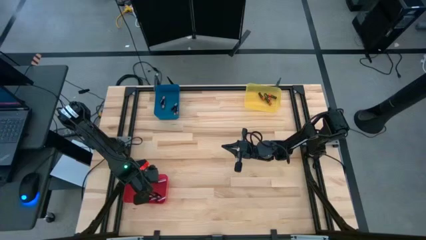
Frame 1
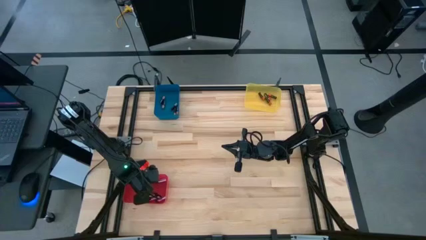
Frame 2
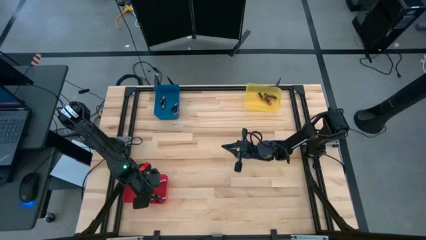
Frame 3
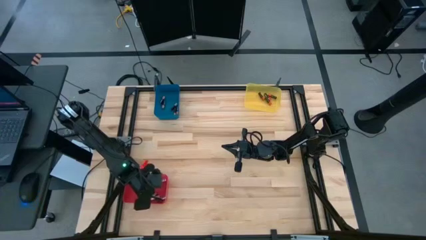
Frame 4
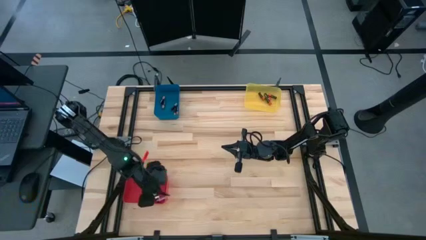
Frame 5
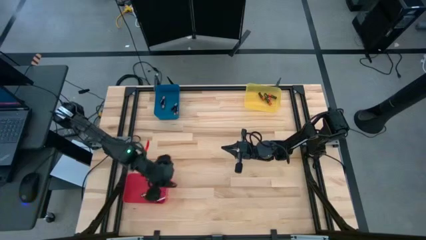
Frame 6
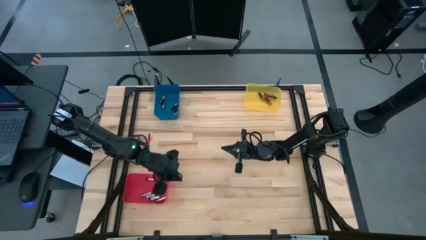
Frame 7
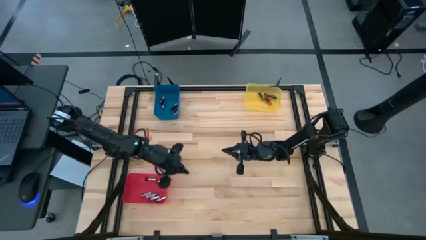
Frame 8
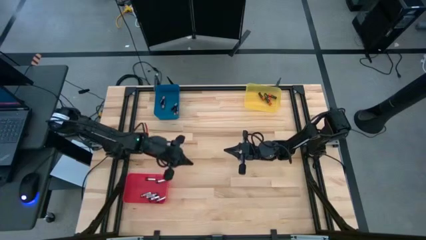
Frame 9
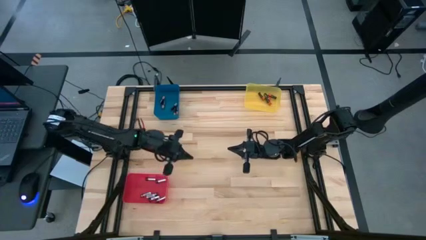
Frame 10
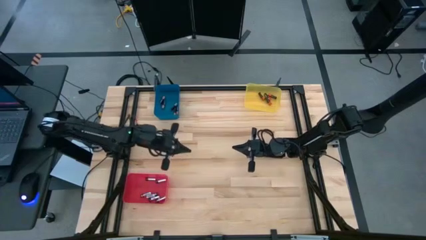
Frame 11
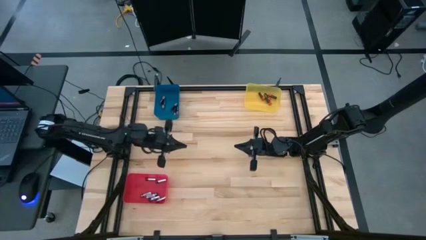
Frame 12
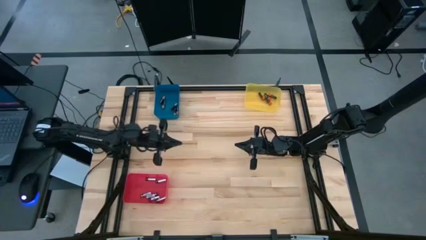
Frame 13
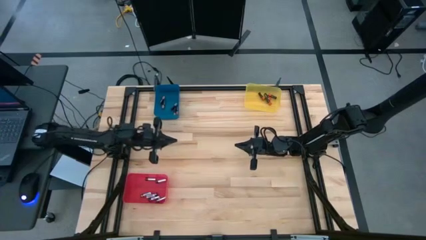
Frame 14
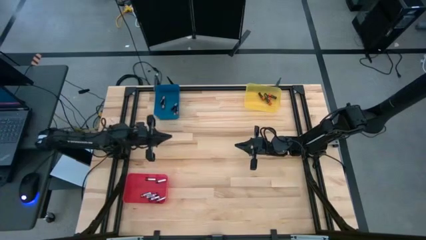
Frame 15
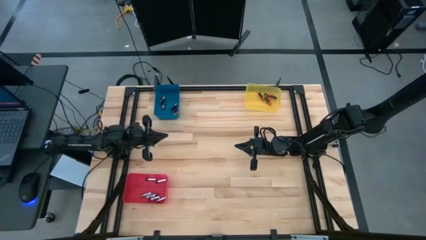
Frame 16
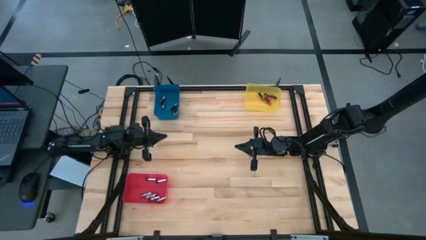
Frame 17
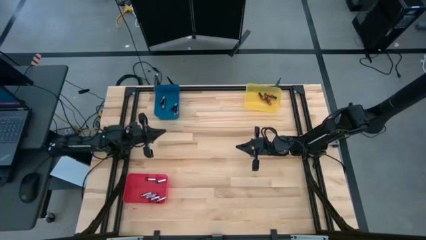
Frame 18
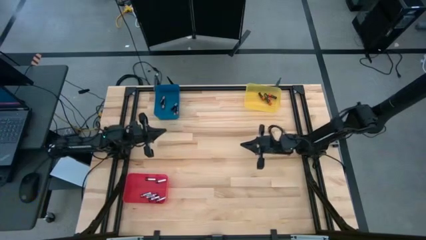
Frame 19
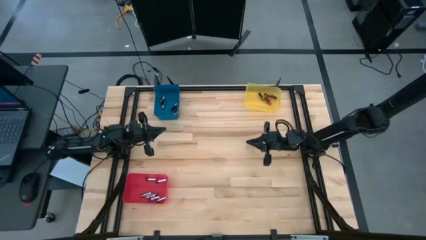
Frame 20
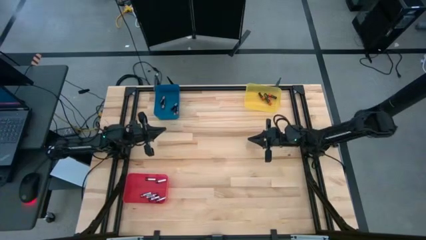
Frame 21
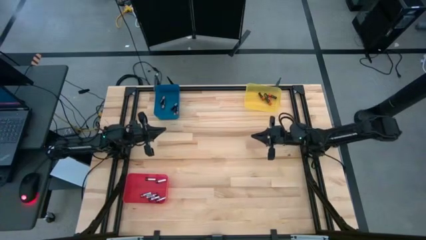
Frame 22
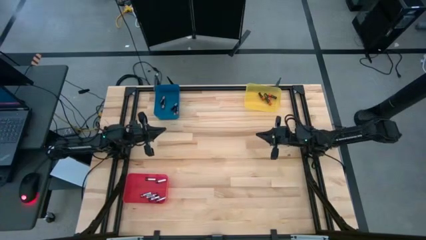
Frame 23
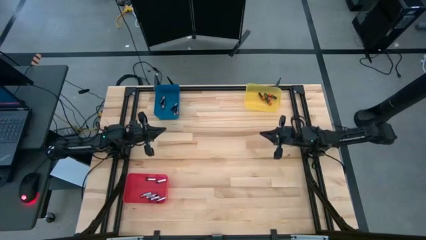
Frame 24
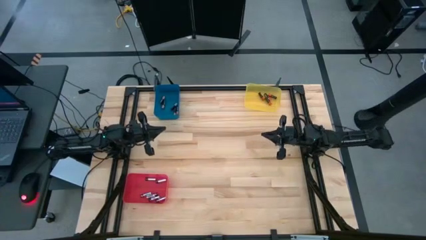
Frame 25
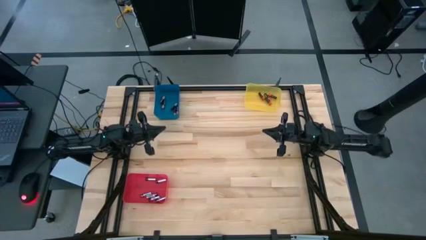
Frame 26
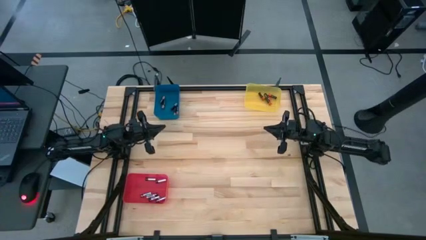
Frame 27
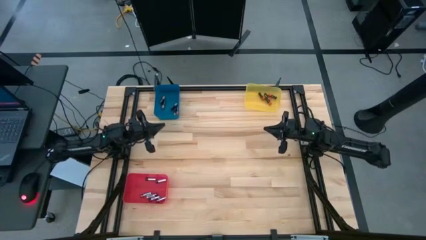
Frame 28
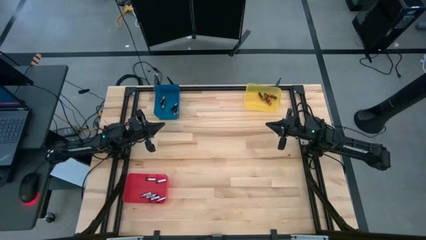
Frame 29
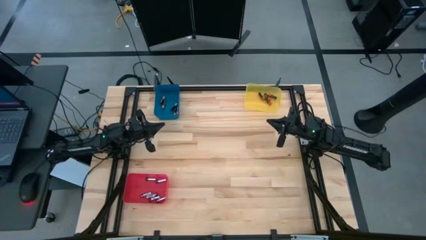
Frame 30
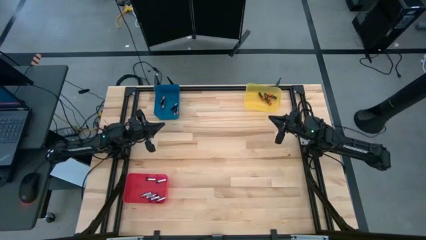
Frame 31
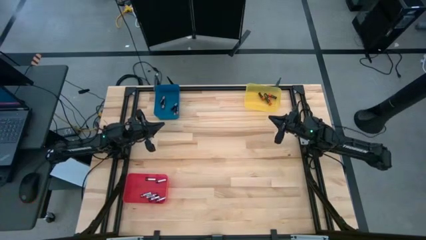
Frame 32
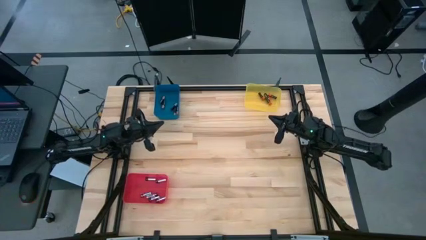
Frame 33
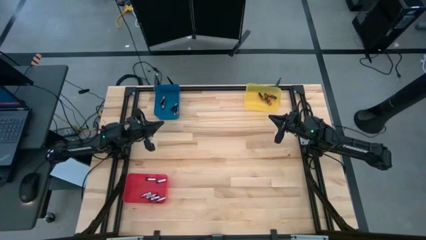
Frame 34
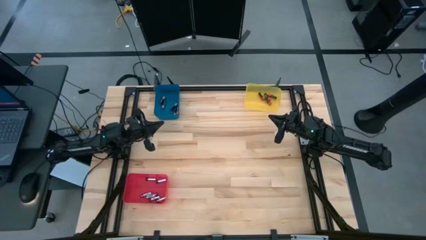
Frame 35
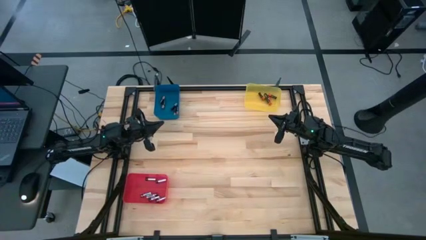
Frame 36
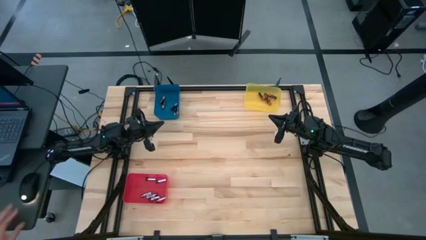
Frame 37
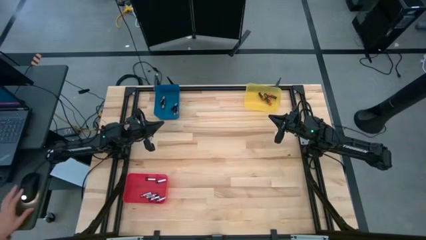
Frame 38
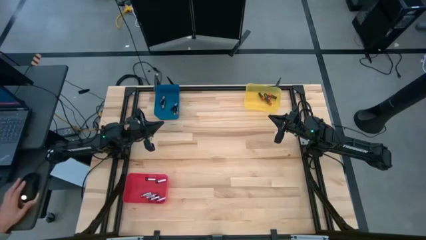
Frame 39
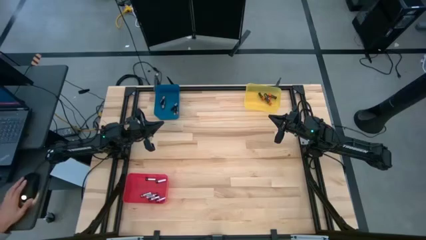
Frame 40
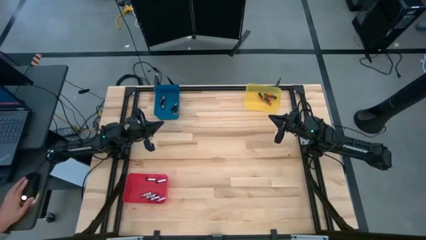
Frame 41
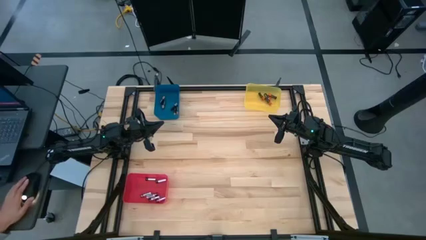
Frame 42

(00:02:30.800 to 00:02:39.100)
Task: Sort batteries
Return to Home Position

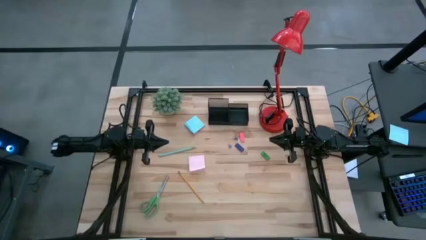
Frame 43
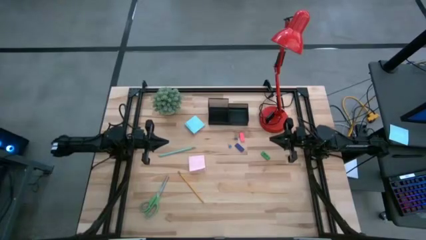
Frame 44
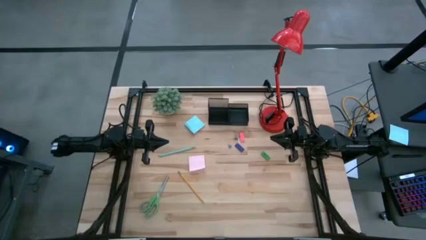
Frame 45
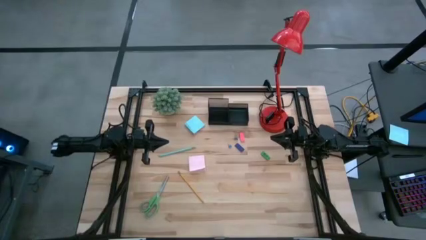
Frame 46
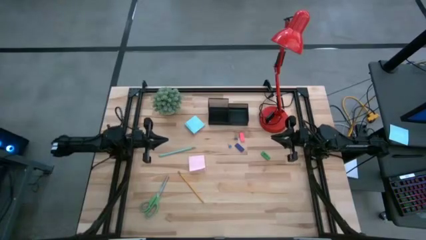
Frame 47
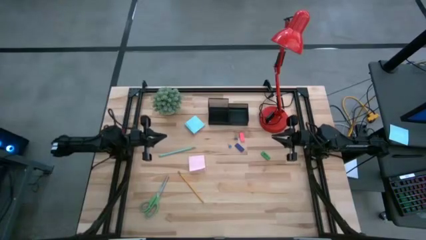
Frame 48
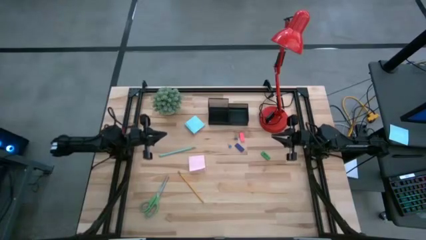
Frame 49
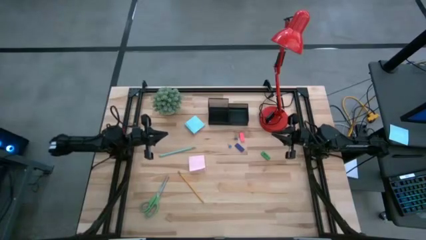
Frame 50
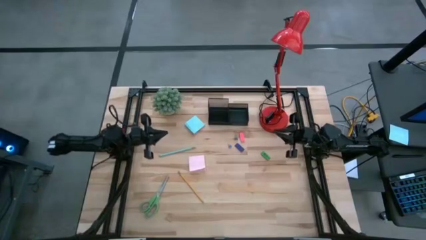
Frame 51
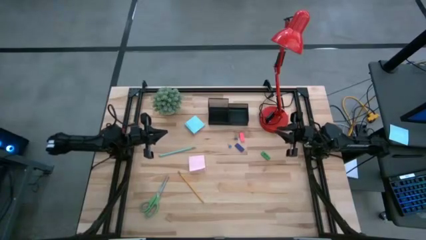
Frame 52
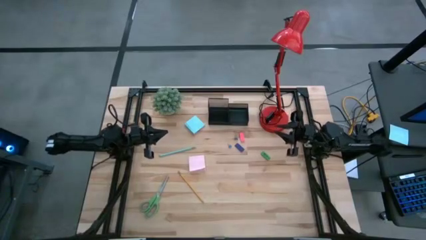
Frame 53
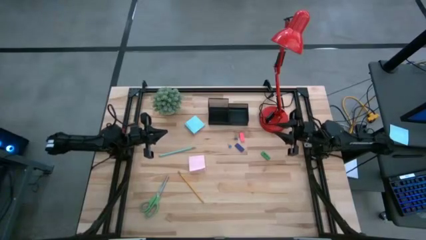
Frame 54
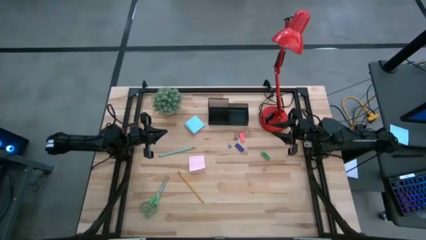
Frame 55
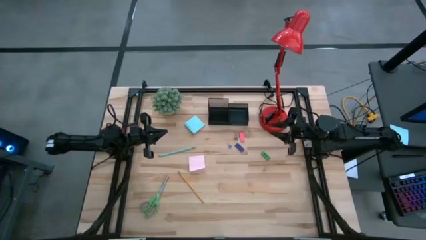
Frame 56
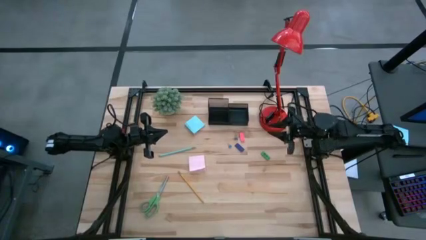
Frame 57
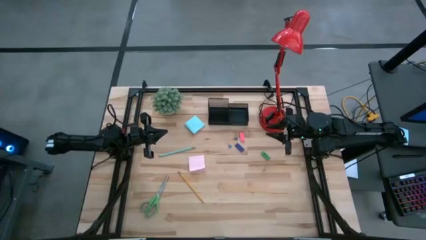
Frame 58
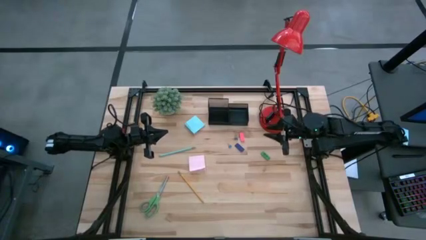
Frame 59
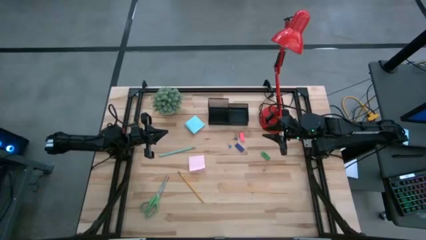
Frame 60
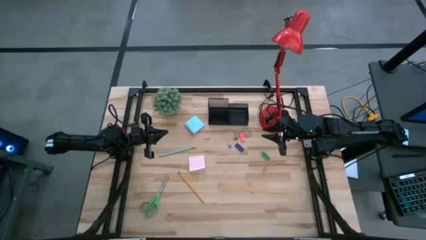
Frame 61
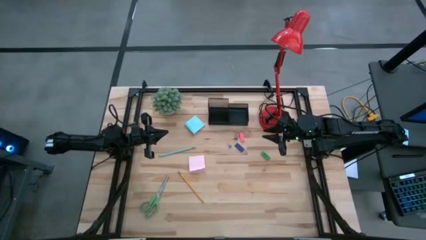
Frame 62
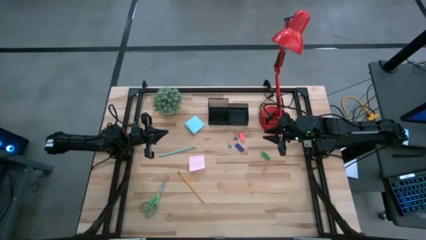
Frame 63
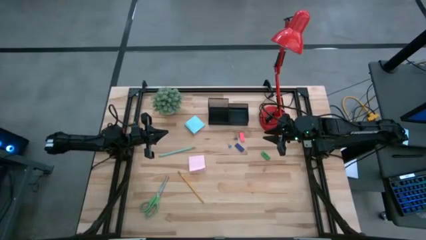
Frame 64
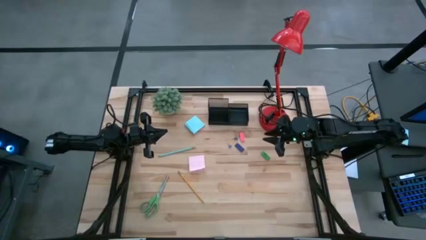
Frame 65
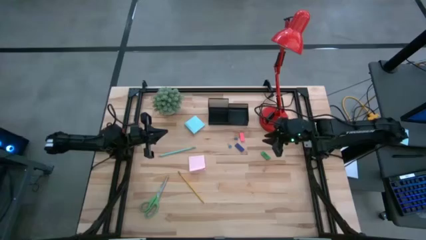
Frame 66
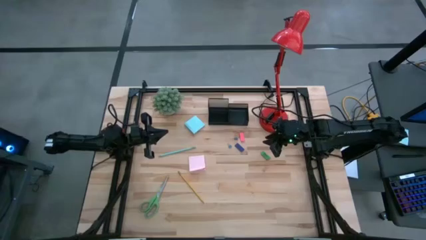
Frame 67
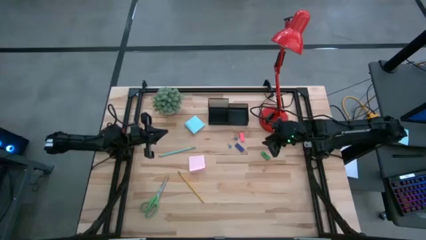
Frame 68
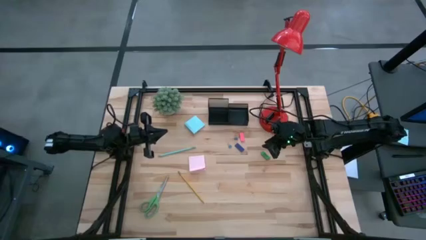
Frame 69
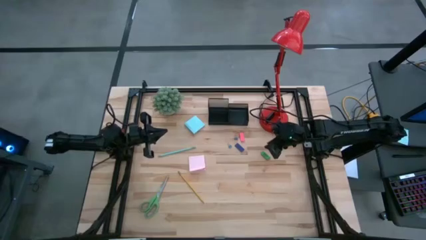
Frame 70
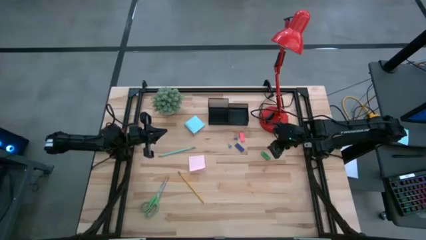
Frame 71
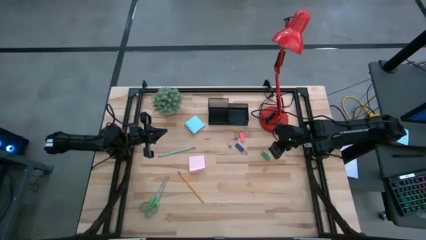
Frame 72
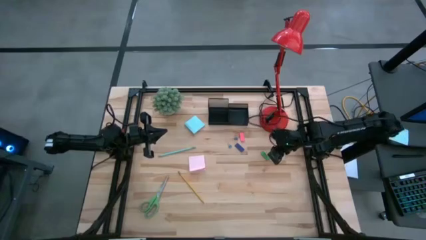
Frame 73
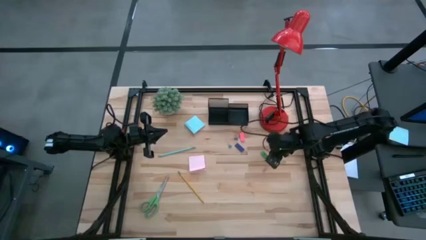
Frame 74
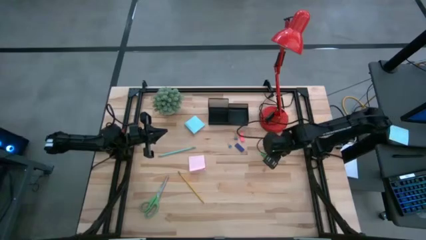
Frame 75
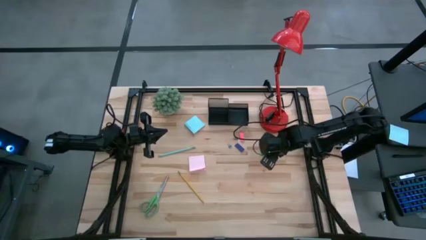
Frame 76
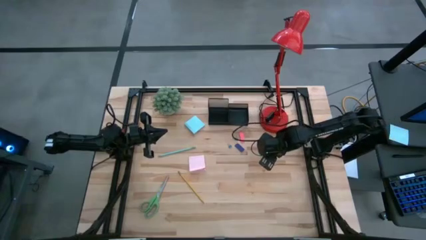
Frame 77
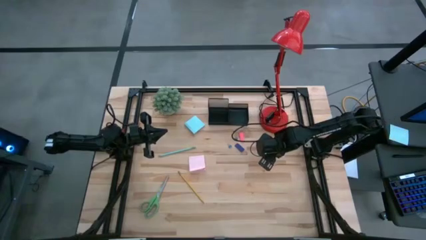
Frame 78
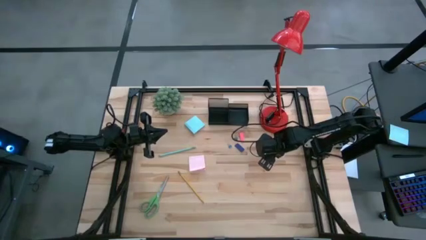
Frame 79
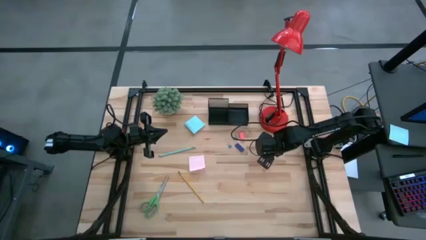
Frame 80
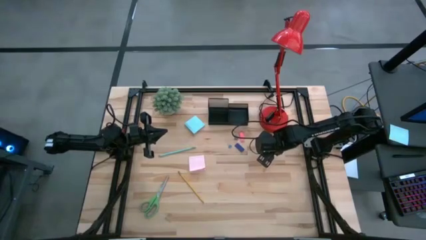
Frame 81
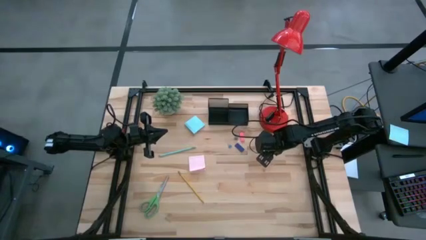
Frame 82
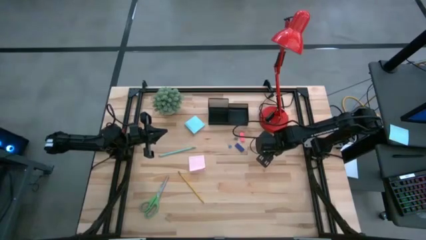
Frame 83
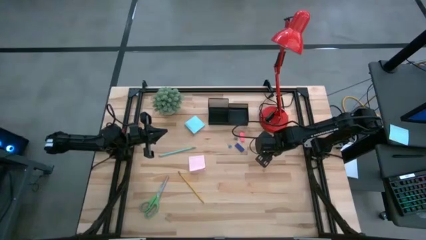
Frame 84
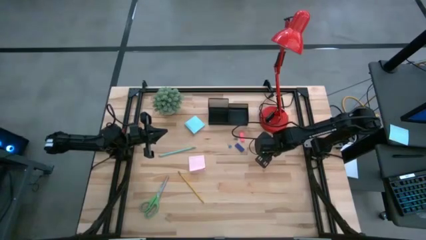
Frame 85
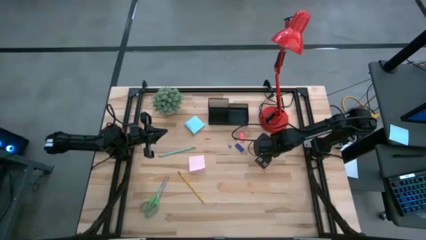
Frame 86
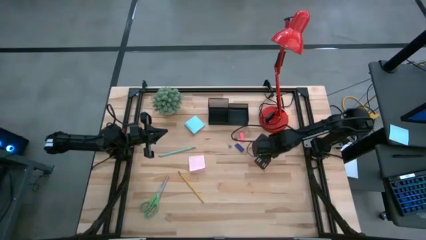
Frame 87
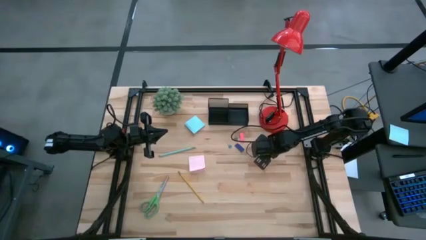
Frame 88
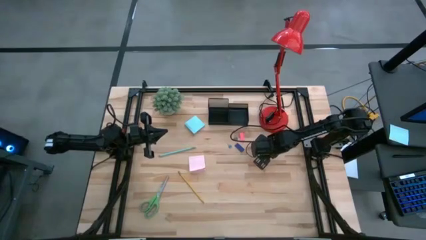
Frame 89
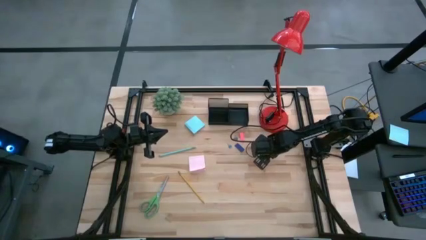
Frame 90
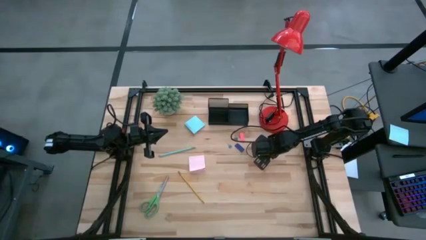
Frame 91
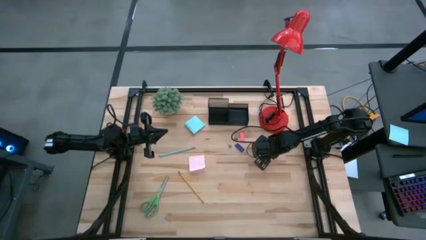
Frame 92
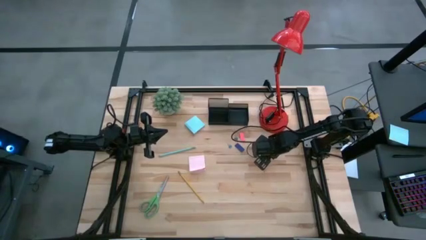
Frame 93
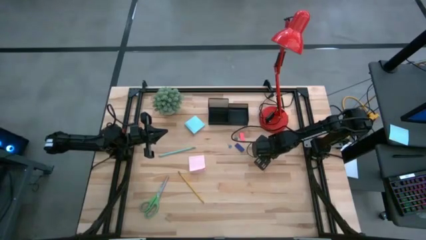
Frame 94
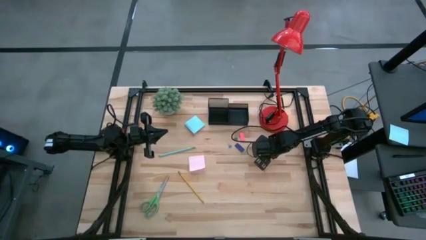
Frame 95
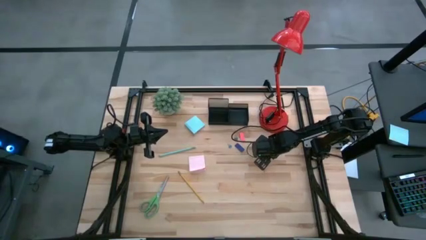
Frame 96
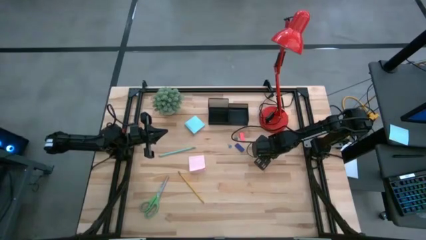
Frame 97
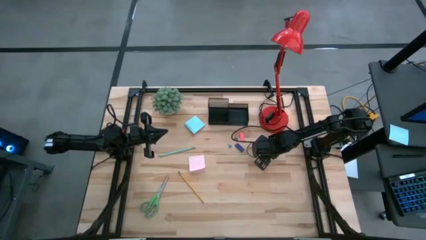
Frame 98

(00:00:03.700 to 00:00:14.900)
Task: Pick and place office supplies into organizer
Put the green eraser into the desk organizer
